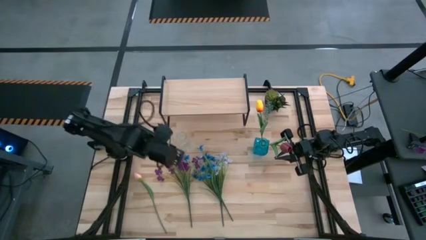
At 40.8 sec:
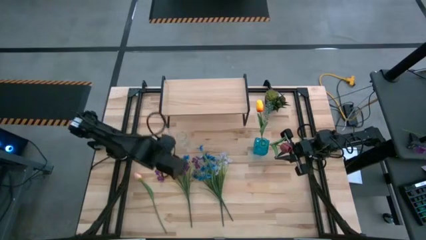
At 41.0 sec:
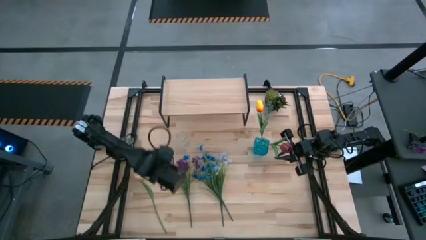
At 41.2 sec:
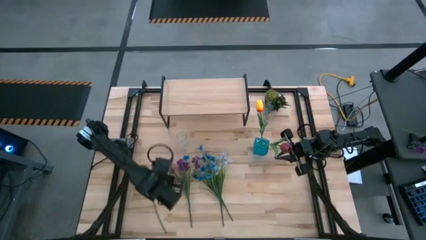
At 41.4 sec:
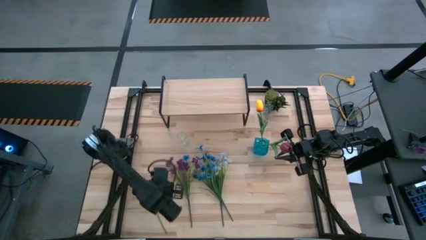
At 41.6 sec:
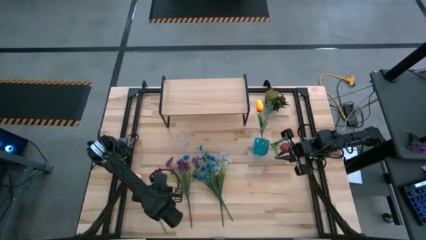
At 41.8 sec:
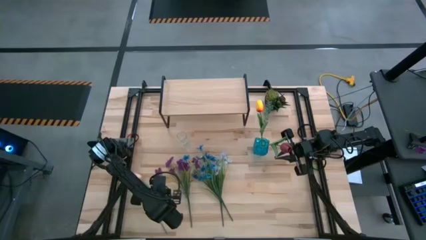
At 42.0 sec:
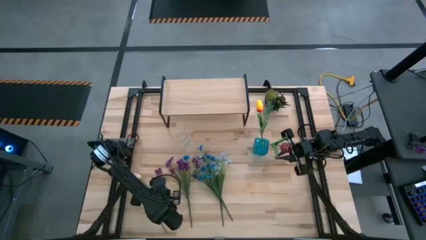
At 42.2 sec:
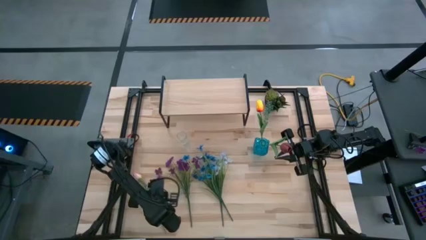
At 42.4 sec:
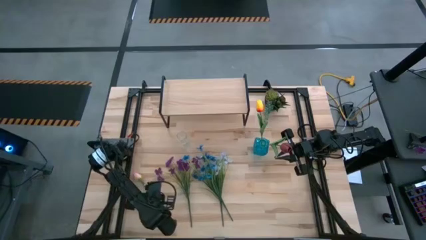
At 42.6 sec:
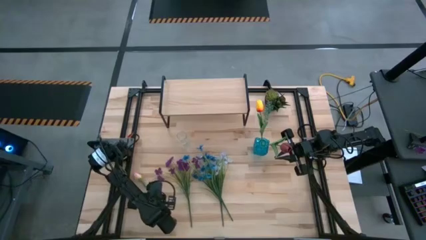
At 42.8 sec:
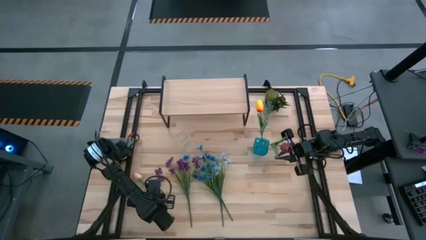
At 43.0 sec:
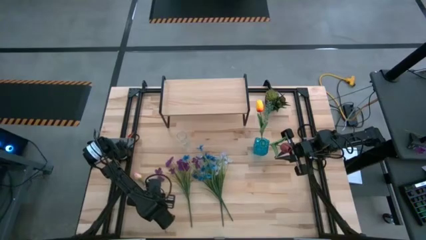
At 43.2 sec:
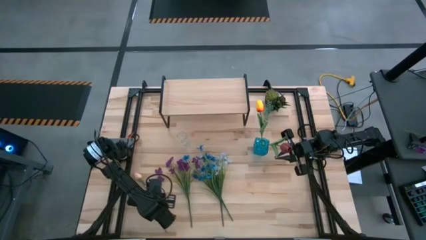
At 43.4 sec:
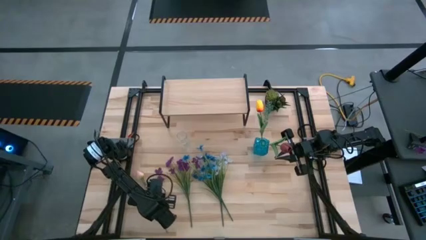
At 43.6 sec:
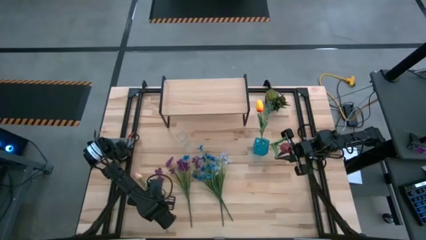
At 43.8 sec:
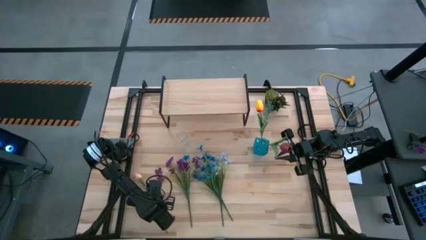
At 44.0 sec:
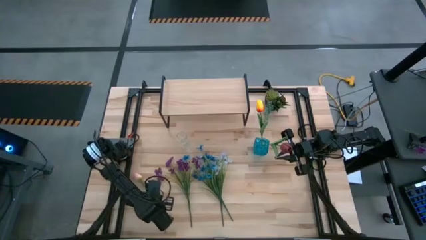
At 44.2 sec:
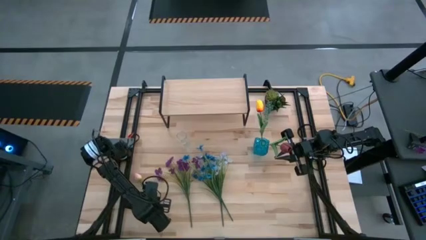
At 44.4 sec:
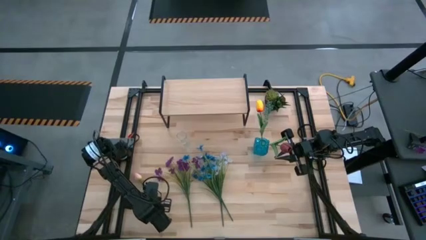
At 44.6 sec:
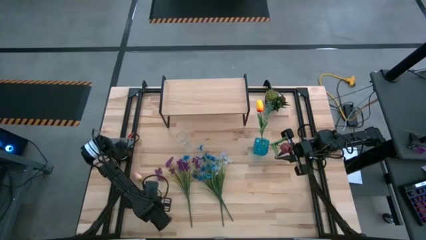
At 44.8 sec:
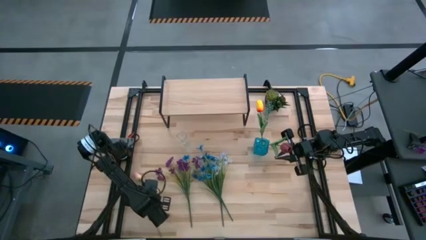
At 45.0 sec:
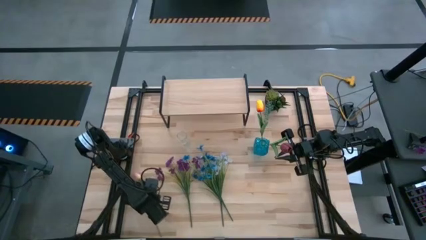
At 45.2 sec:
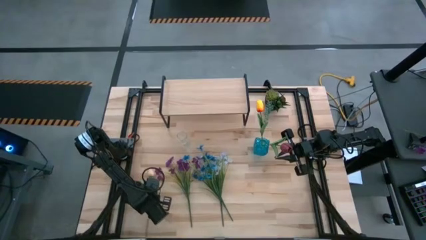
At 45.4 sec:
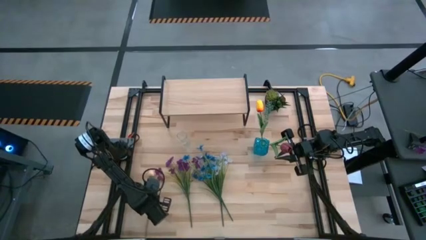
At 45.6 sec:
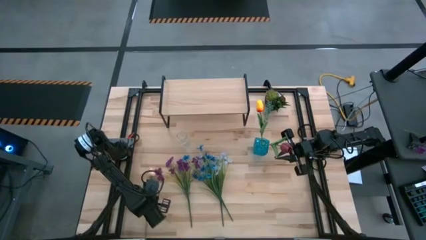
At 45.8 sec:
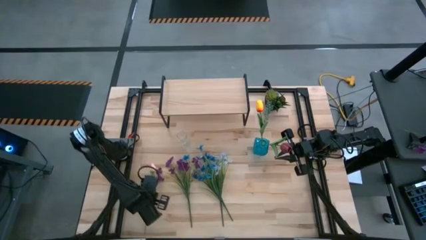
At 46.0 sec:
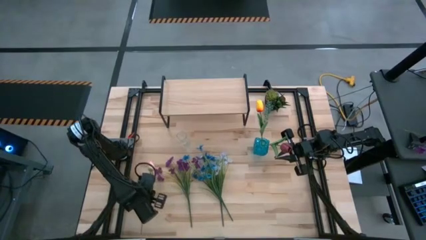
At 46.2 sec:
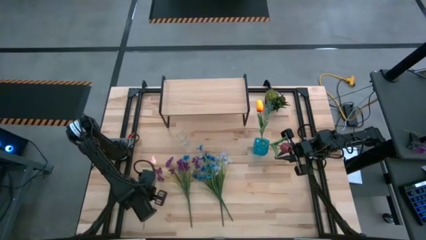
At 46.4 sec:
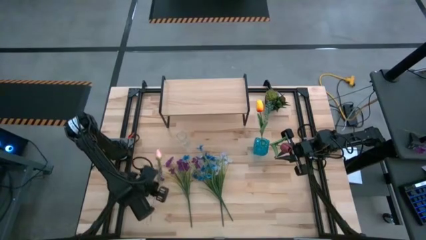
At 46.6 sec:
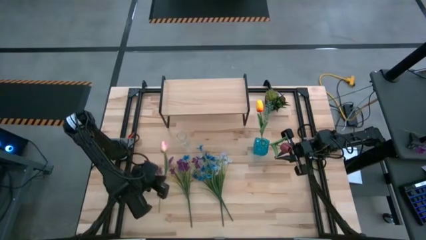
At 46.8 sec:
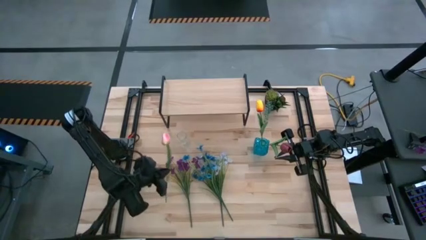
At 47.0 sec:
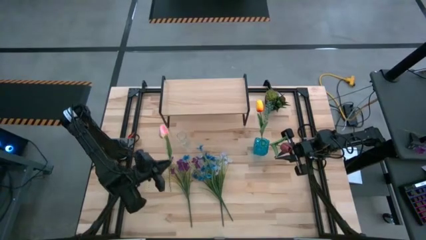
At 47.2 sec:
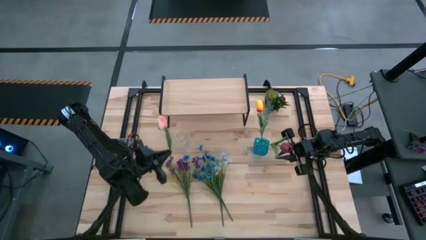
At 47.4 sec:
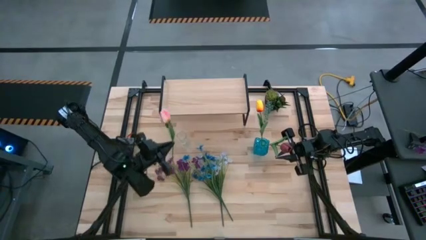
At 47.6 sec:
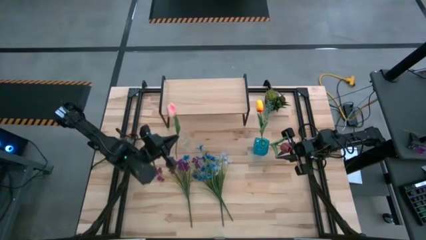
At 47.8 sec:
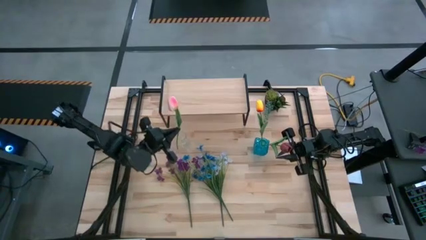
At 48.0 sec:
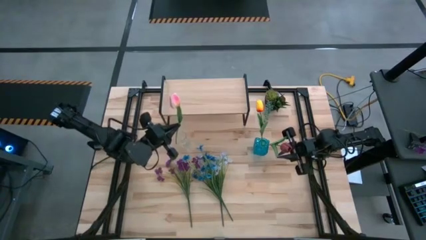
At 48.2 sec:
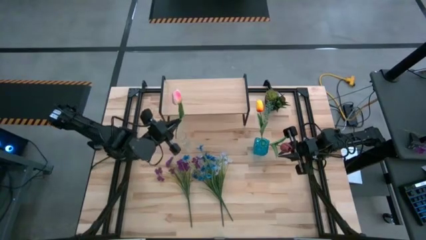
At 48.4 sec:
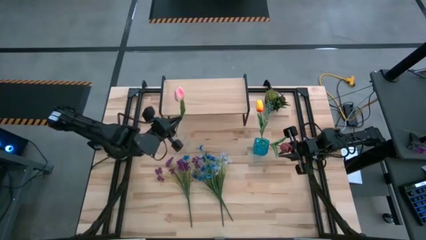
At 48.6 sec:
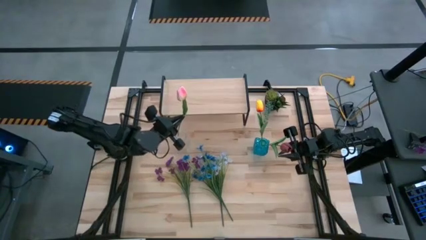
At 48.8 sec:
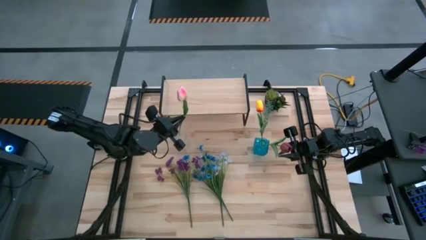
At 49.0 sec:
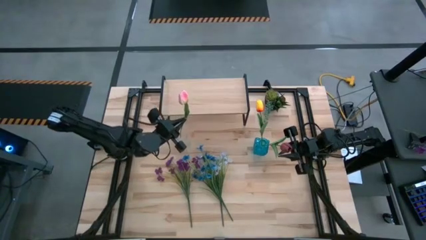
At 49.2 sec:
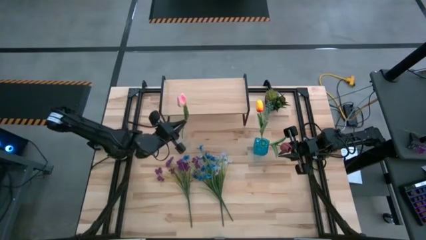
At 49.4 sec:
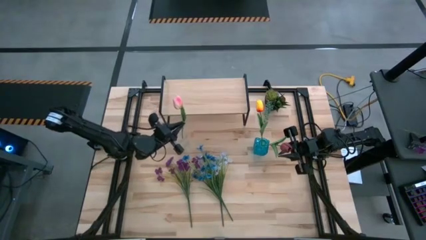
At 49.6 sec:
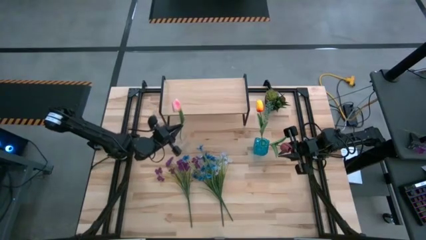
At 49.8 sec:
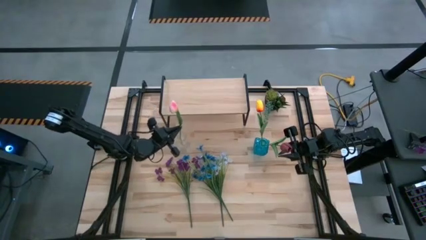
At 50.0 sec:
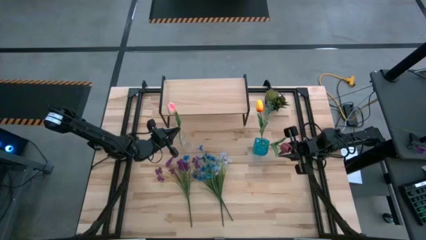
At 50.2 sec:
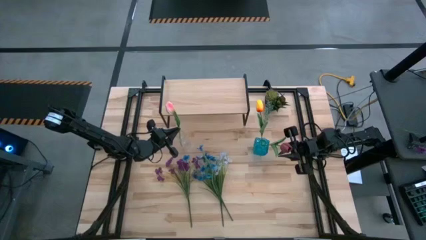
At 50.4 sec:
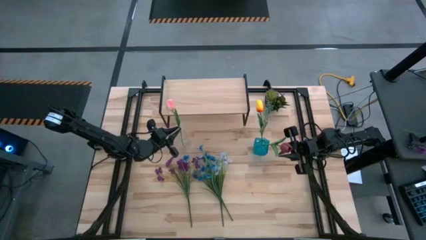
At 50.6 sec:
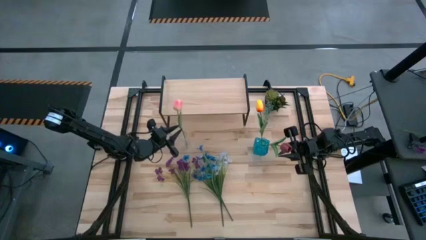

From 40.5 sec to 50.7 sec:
Task: Pick and place flowers into a vace then onto a shelf
Put the pink tulip into the transparent vase

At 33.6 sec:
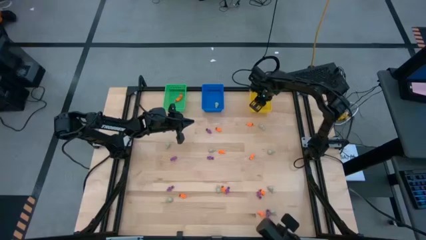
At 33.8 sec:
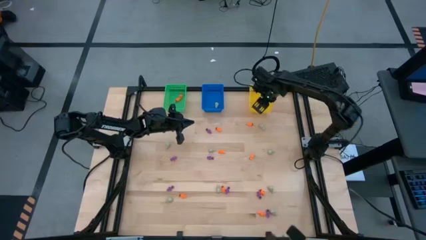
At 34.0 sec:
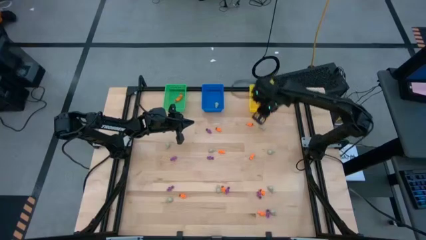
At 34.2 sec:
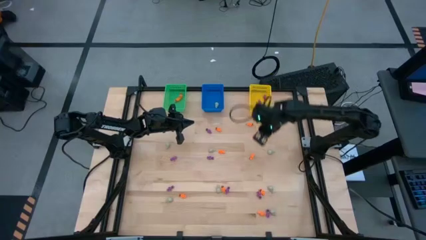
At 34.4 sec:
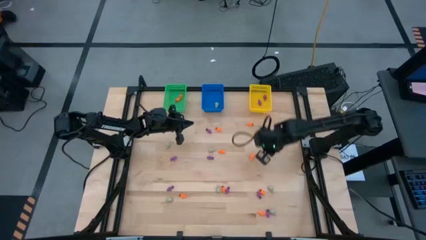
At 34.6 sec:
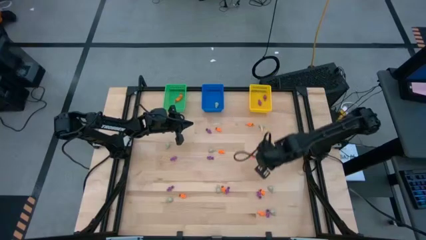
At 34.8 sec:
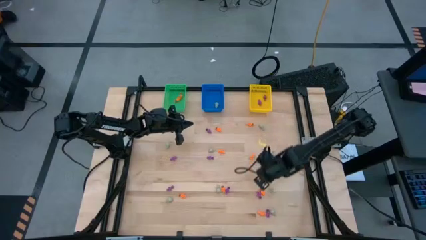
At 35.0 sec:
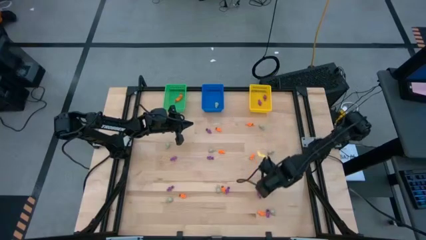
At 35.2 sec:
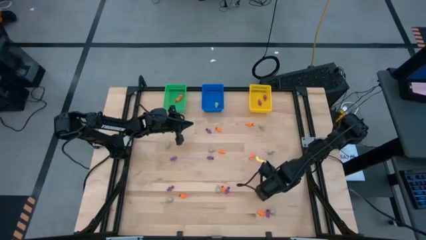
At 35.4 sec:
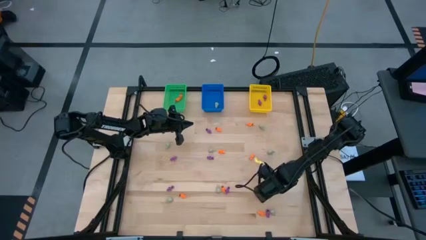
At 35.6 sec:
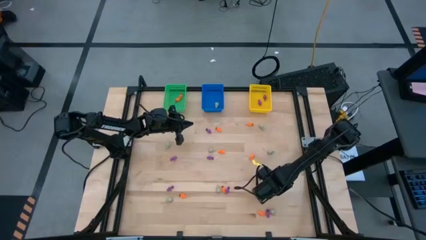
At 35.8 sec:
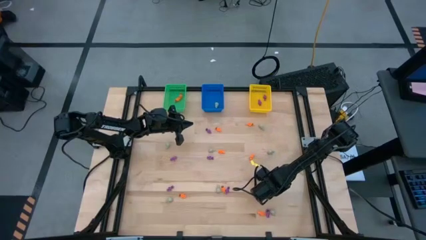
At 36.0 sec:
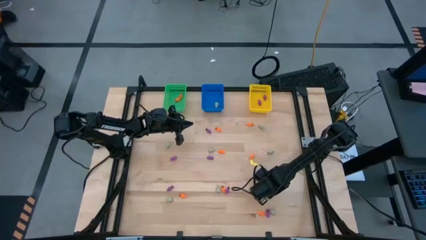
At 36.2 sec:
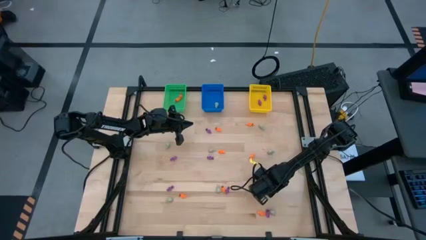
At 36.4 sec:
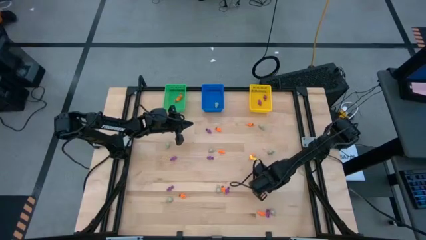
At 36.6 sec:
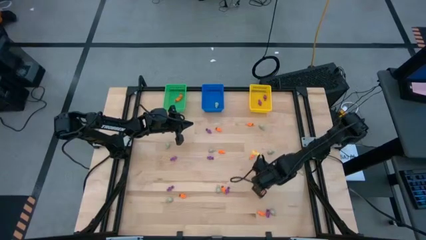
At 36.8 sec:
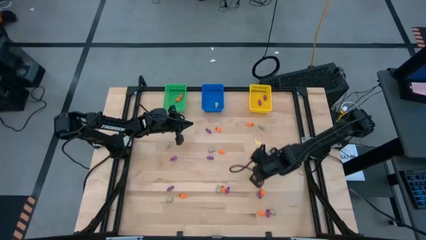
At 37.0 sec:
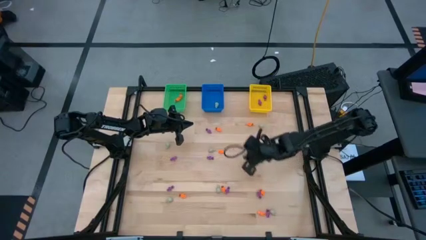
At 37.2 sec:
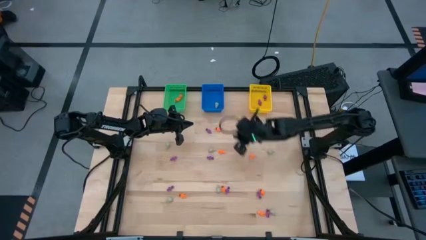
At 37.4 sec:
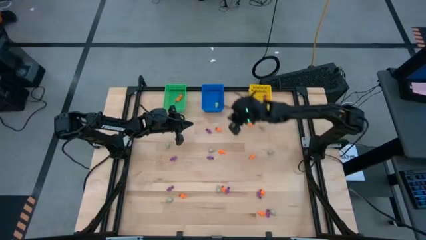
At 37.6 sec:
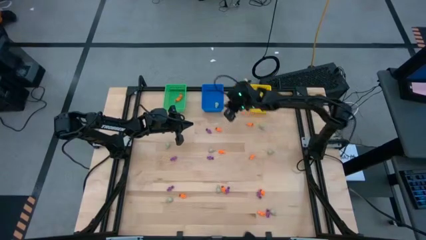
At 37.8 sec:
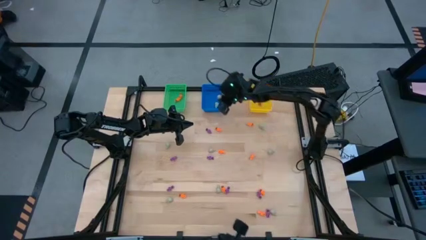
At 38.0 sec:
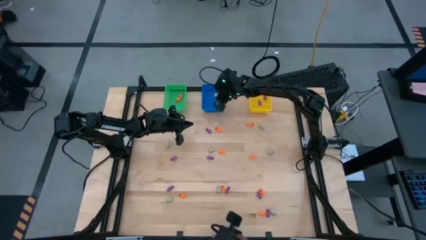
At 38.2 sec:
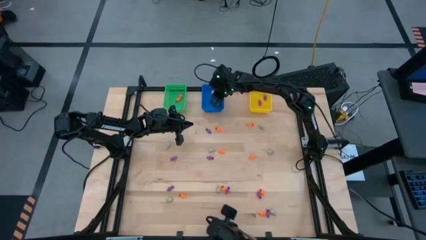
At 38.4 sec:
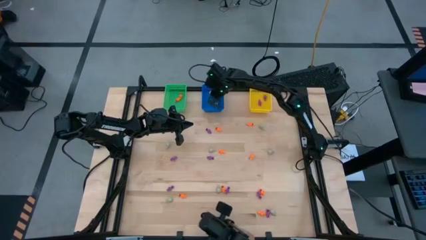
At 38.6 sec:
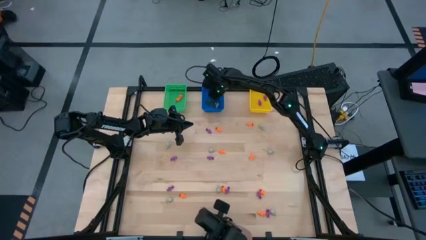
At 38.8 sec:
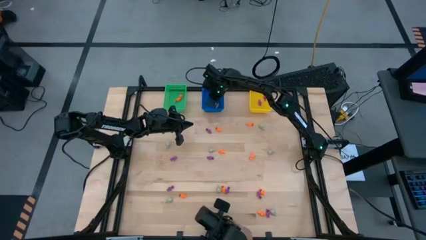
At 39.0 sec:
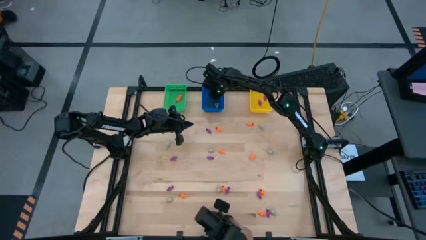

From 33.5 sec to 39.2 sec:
Task: Sort Halloween decoration
Put the white skull toy into the blue bin

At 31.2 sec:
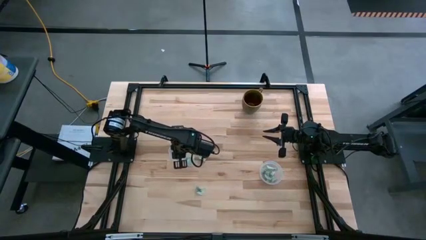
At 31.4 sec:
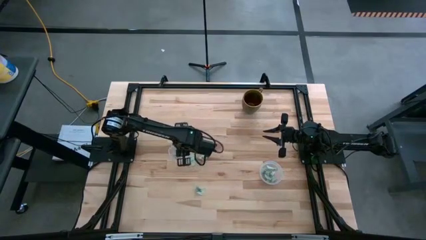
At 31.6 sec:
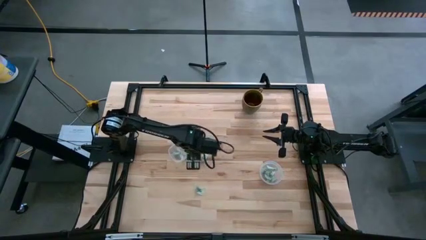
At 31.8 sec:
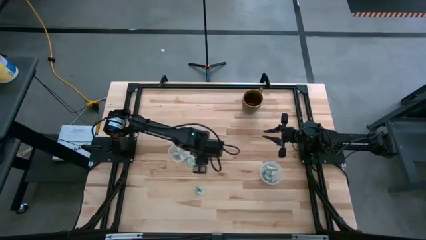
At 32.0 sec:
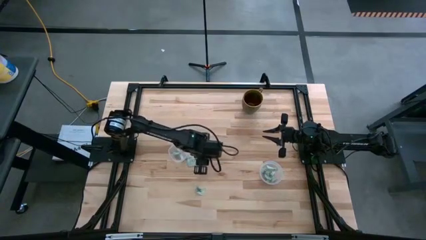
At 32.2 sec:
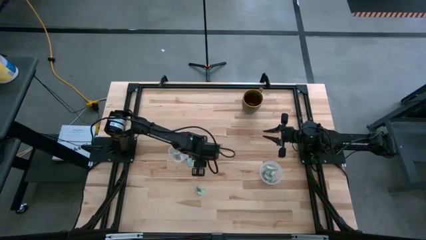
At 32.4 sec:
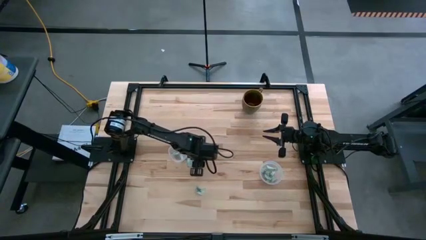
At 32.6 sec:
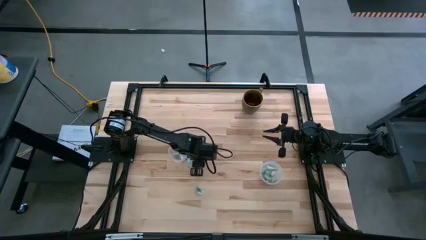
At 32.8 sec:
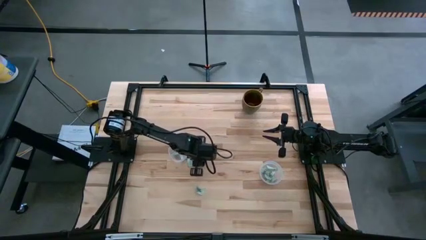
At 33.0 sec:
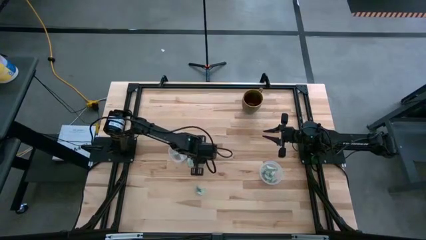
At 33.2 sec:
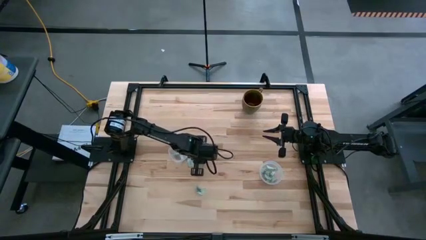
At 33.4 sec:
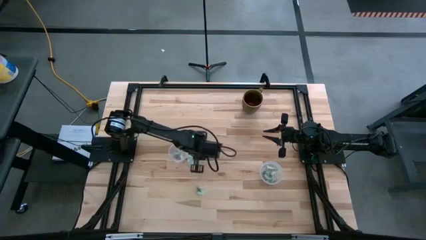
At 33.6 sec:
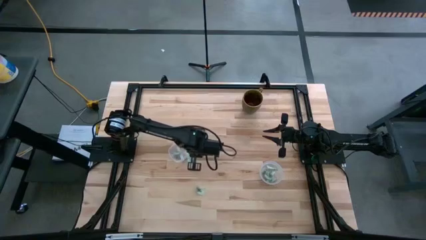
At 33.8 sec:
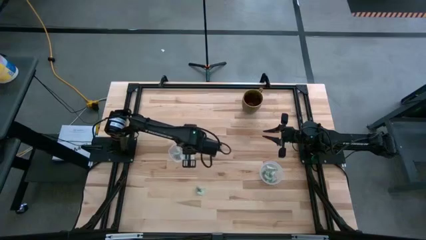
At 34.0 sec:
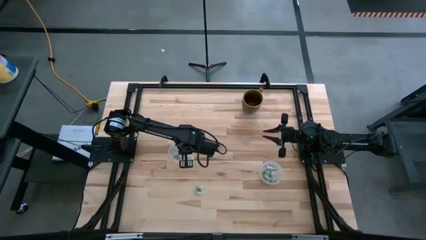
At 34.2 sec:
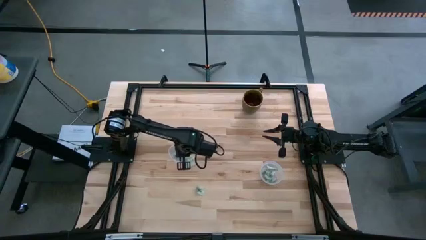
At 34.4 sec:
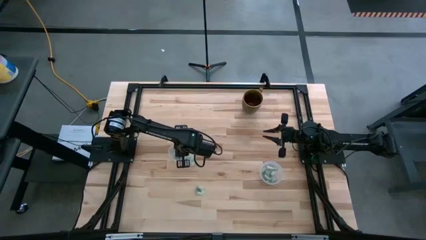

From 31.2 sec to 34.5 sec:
Task: Pick and place Stevia / Truvia into bins
Put the stevia packet into the square transparent container
